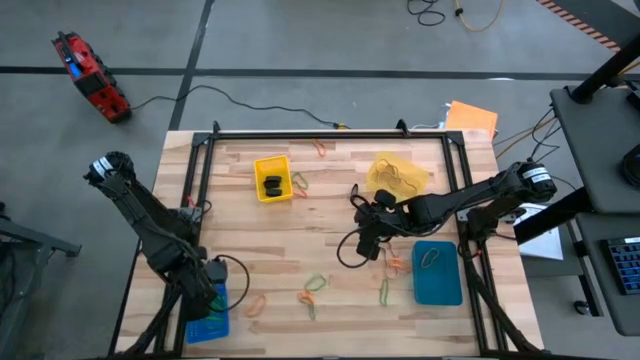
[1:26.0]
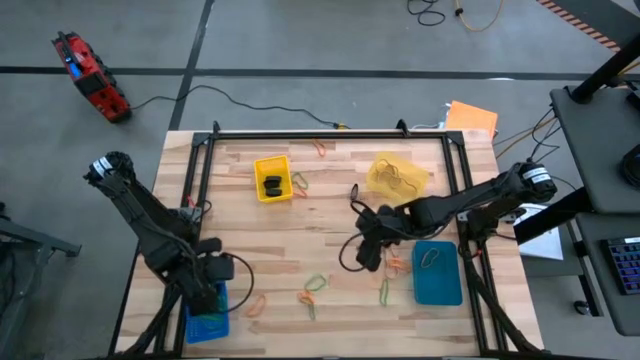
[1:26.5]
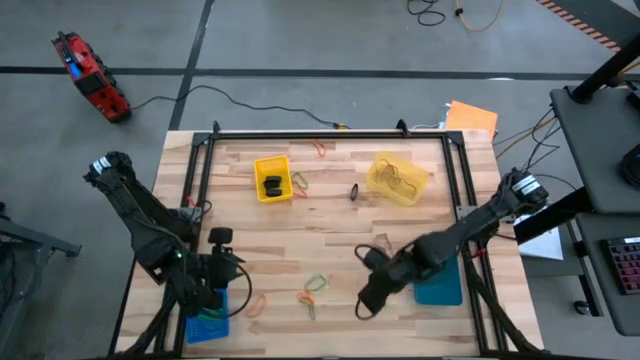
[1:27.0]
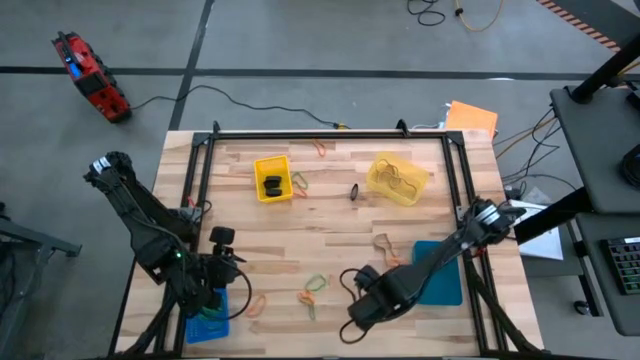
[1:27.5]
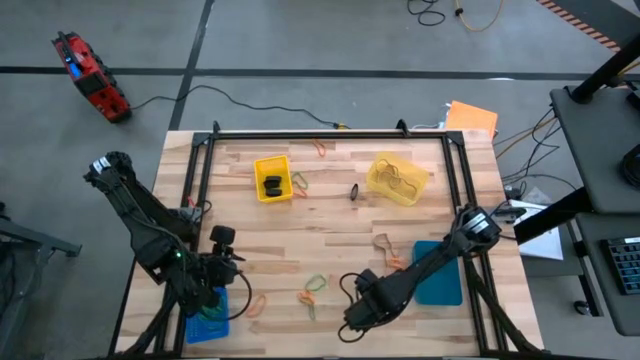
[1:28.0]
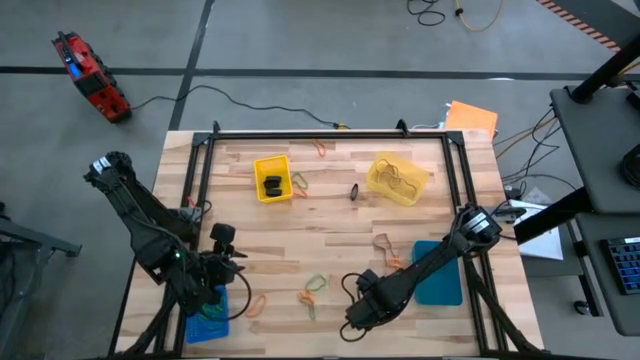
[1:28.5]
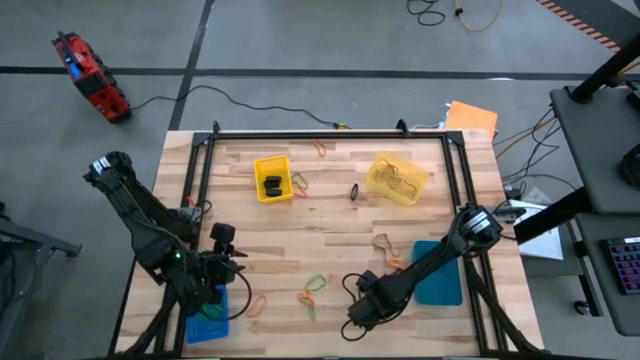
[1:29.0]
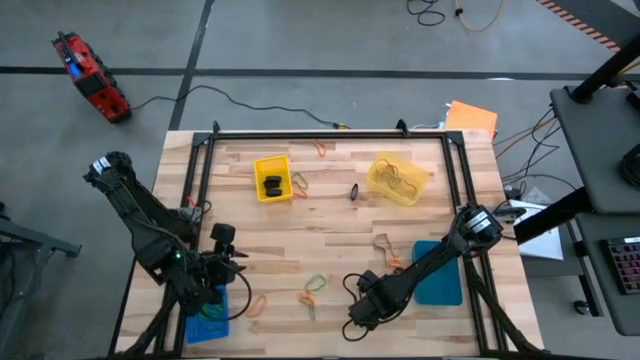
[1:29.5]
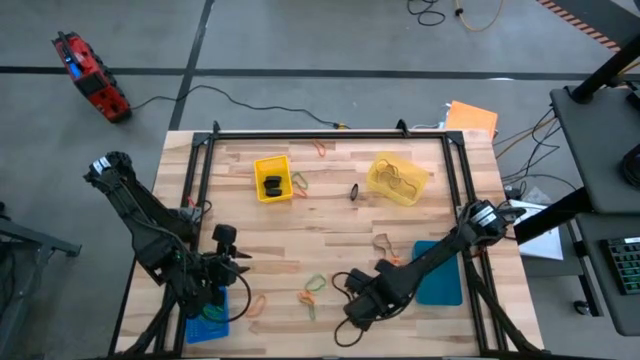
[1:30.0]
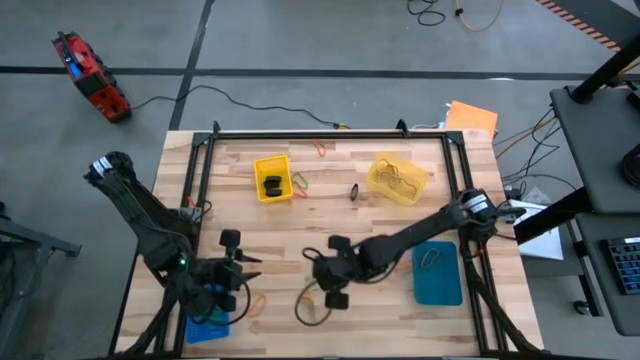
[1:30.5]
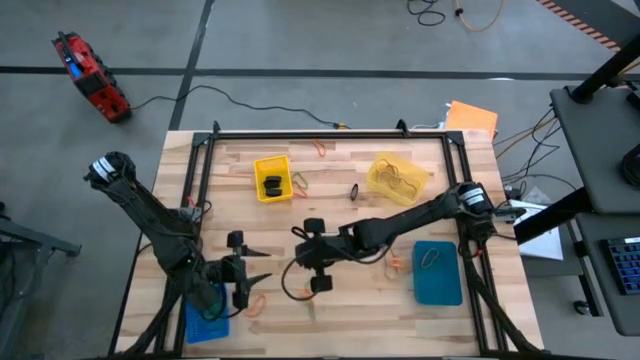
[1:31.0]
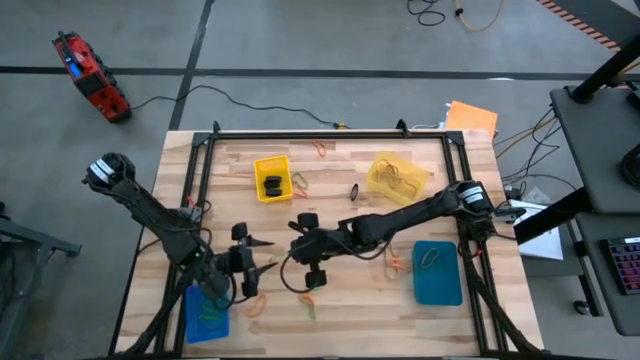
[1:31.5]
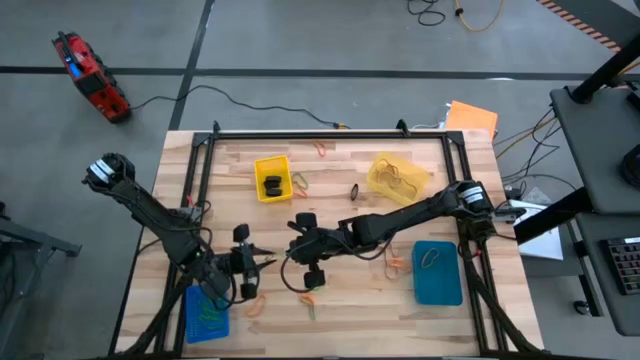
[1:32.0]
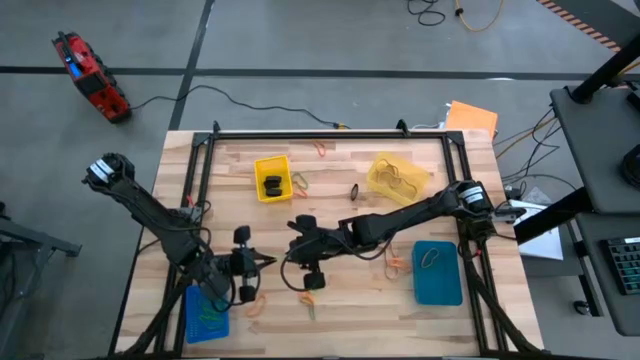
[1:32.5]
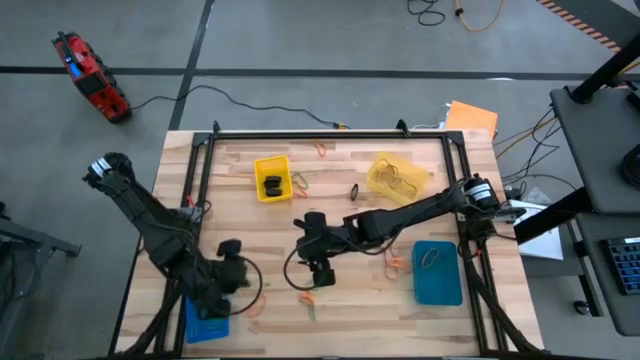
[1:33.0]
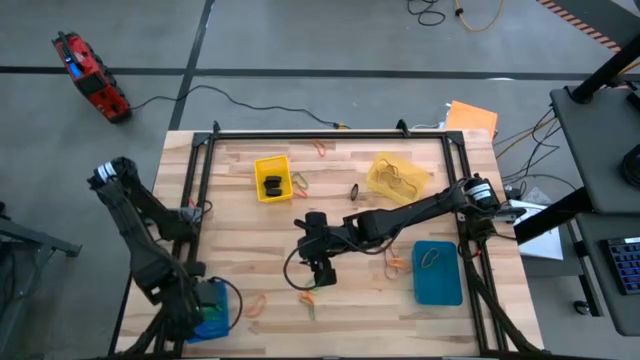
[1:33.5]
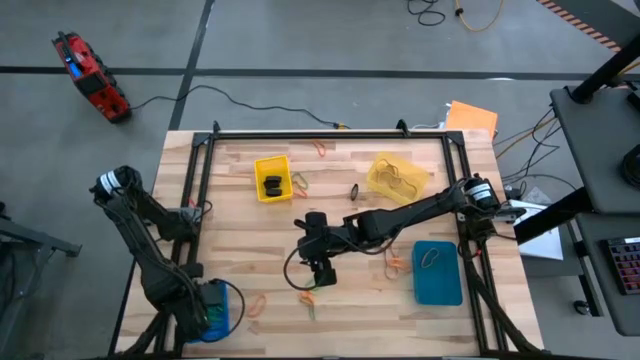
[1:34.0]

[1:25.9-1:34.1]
Task: Sort rubber bands into baskets
Put the green rubber band into the left blue bin

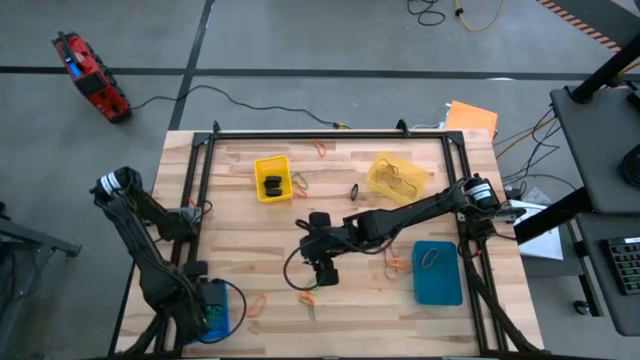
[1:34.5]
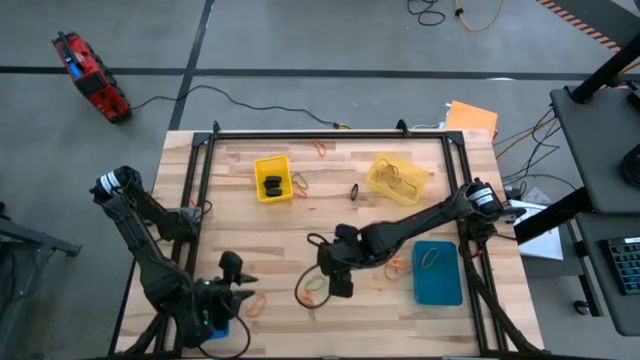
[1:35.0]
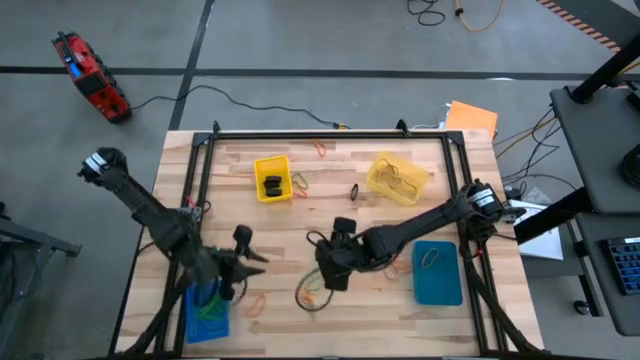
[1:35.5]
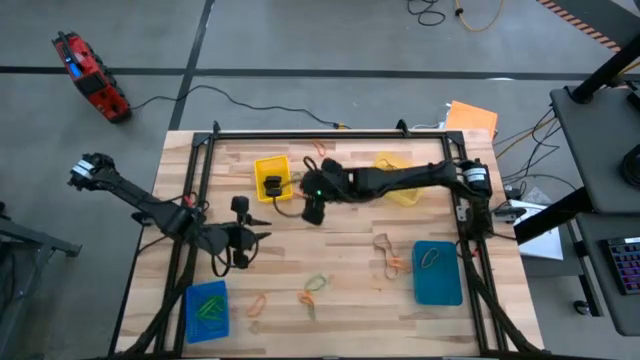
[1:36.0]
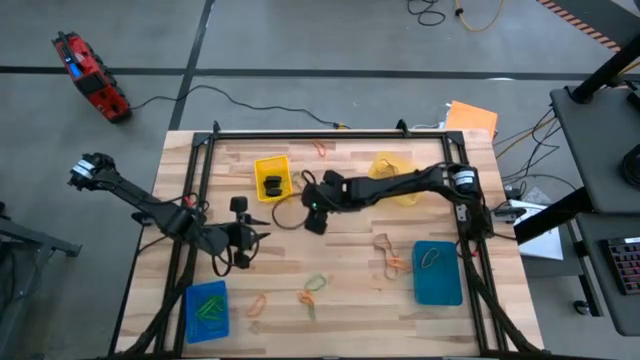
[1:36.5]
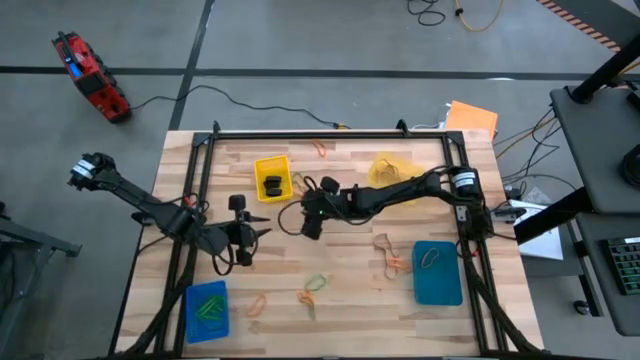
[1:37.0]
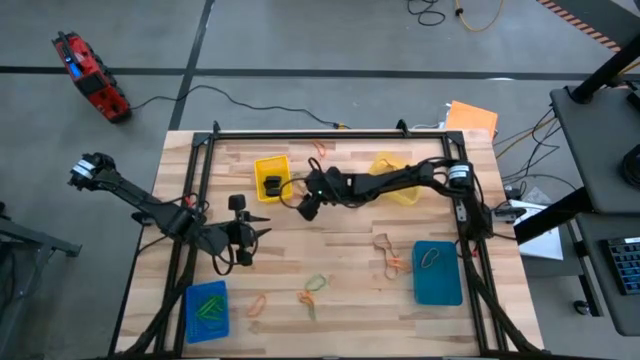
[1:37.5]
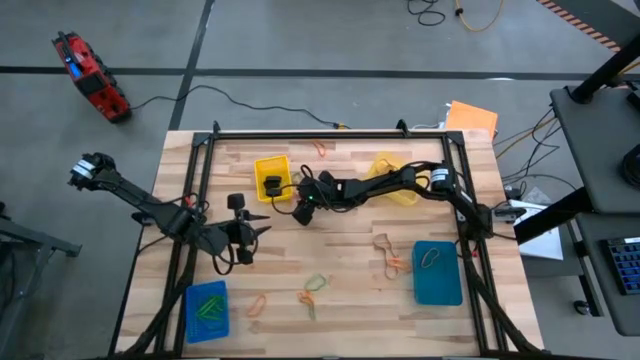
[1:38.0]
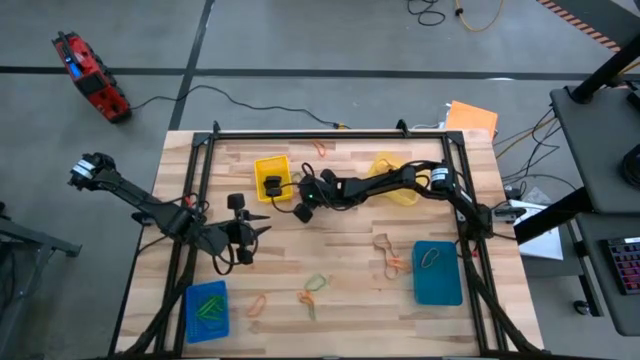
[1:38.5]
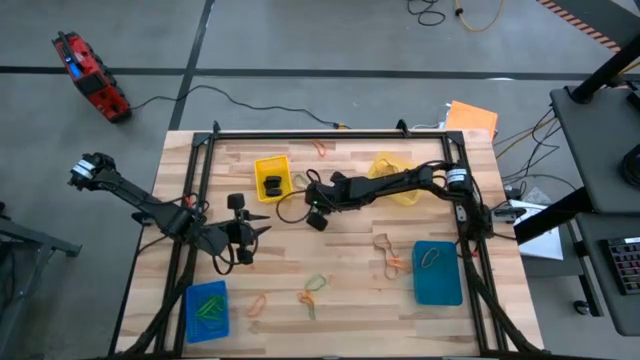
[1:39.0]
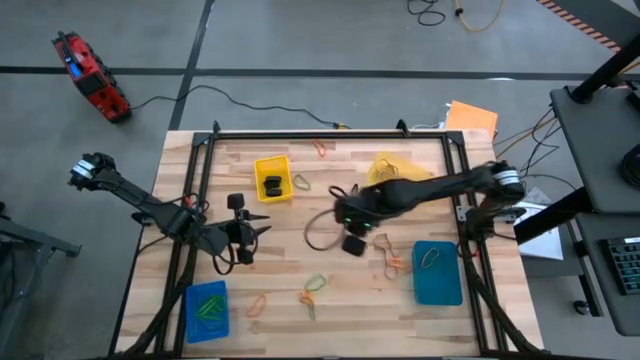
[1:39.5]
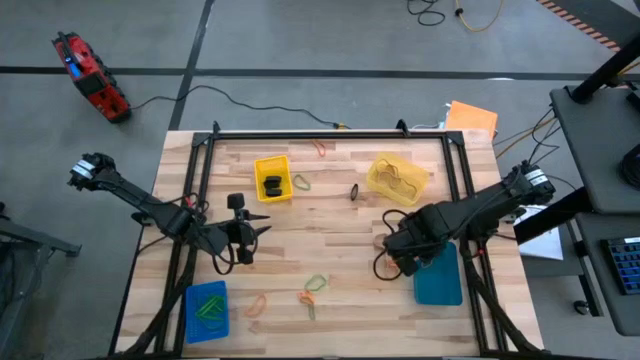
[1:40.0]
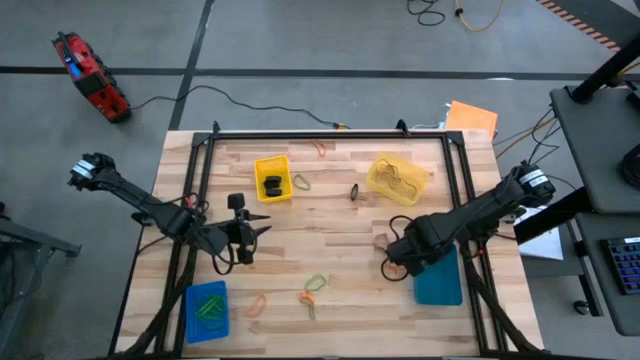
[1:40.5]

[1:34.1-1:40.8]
Put the orange rubber band into the right blue bin

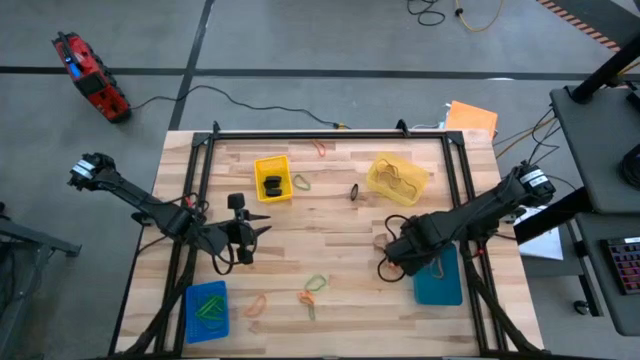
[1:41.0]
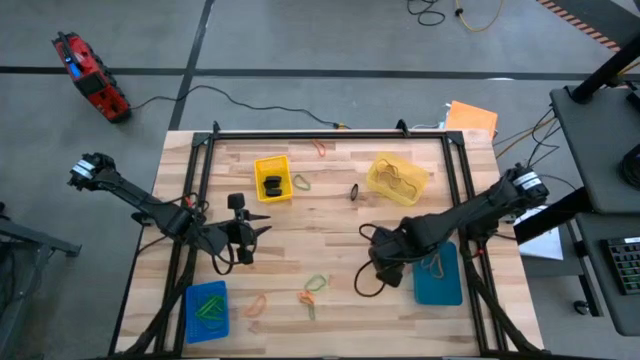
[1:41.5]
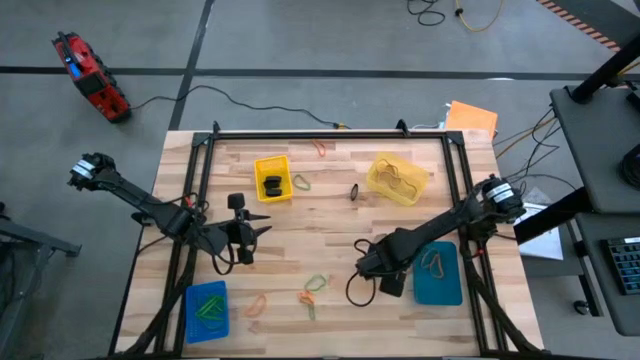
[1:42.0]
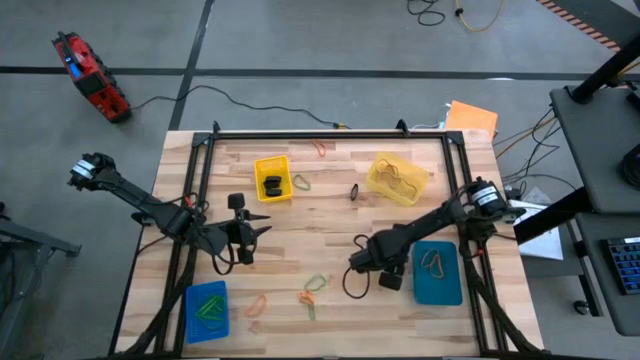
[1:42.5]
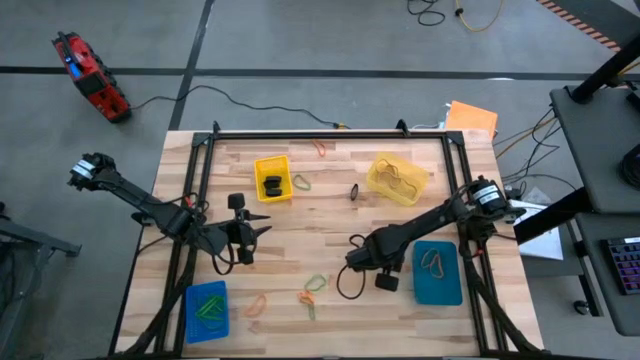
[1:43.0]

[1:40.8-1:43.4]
Put the orange rubber band into the right blue bin

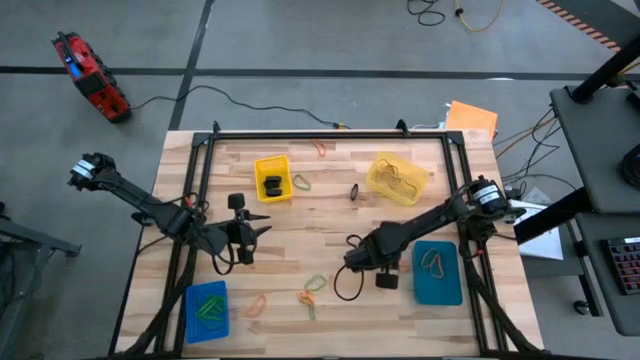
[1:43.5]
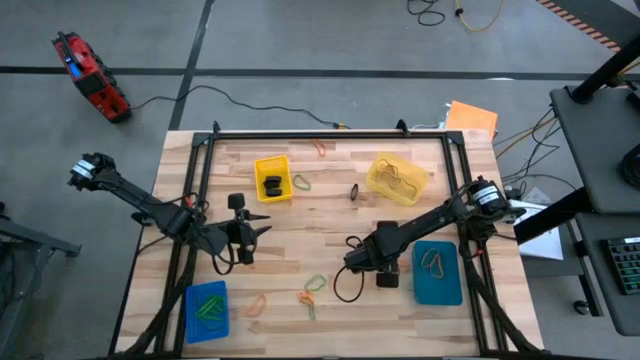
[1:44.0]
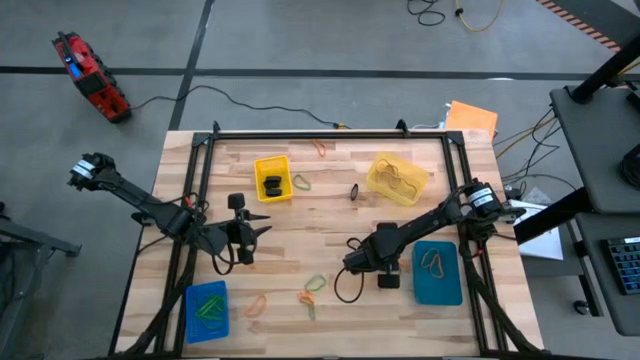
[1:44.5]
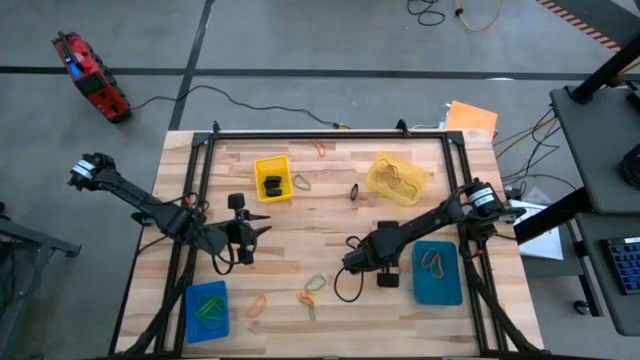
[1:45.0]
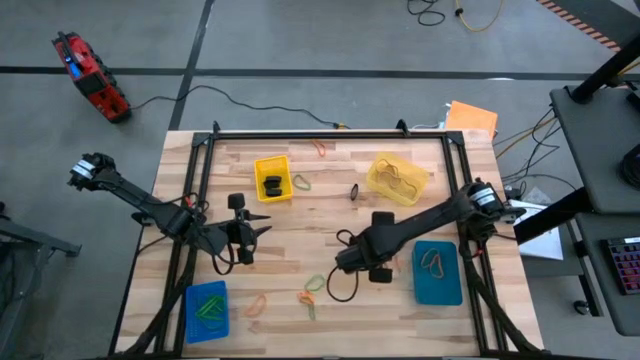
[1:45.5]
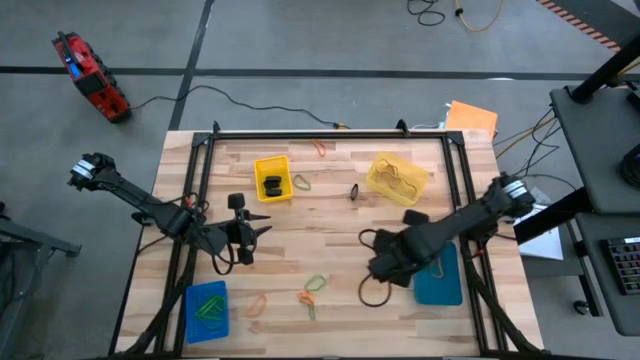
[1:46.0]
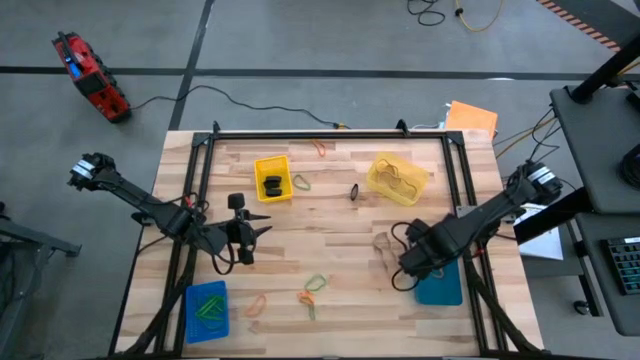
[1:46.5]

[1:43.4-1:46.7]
Put the orange rubber band into the right blue bin
